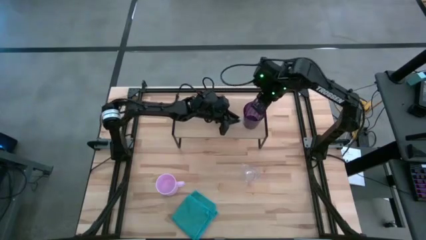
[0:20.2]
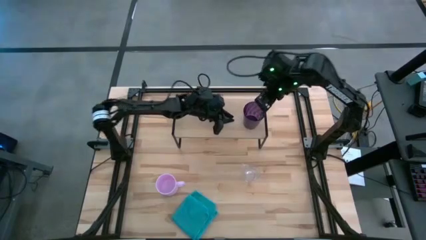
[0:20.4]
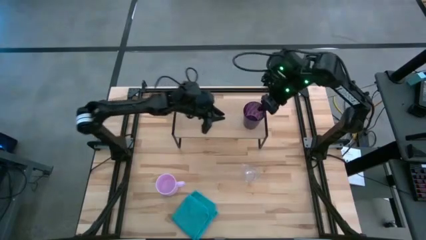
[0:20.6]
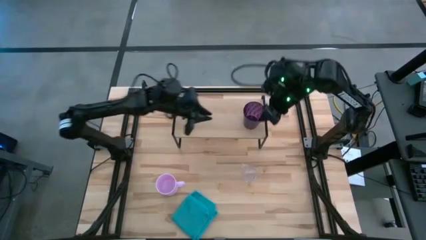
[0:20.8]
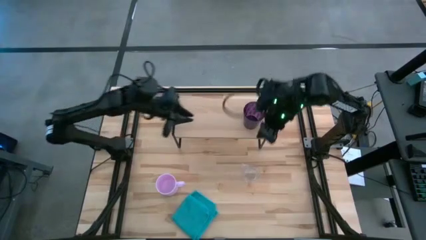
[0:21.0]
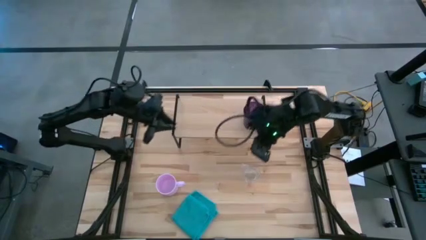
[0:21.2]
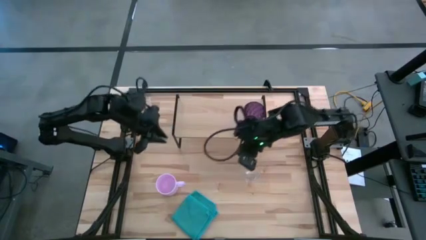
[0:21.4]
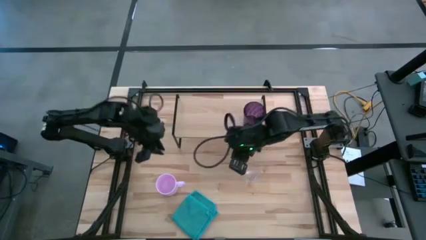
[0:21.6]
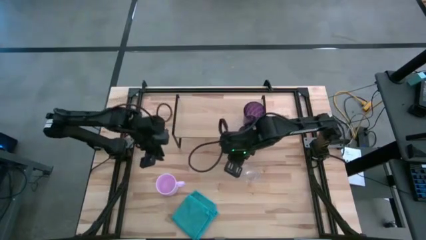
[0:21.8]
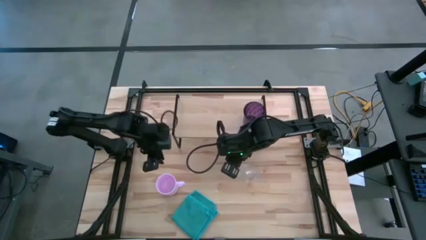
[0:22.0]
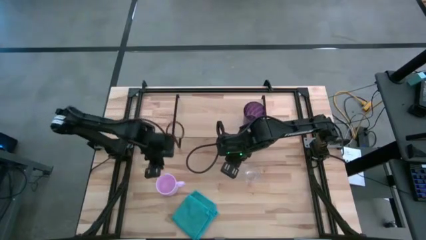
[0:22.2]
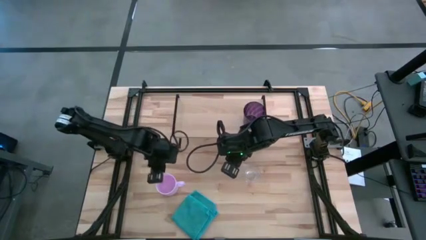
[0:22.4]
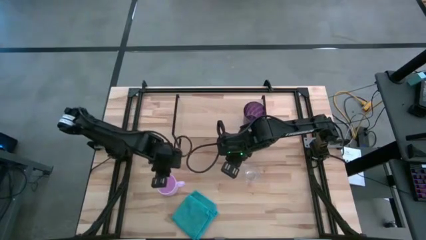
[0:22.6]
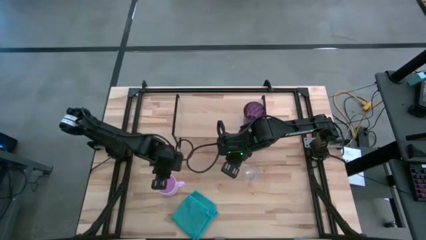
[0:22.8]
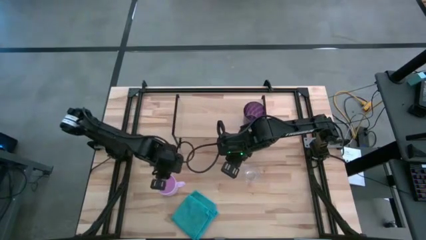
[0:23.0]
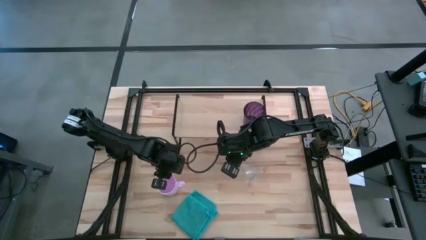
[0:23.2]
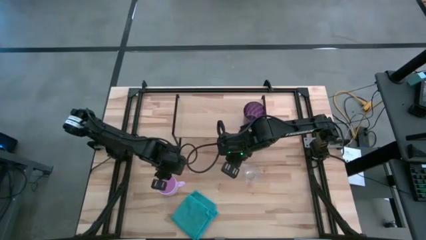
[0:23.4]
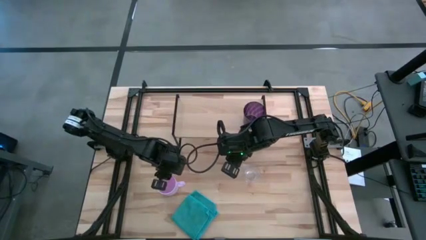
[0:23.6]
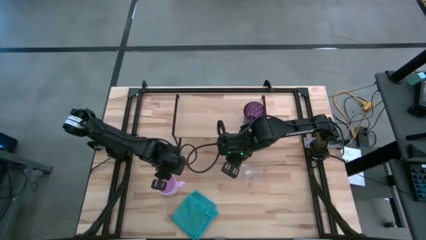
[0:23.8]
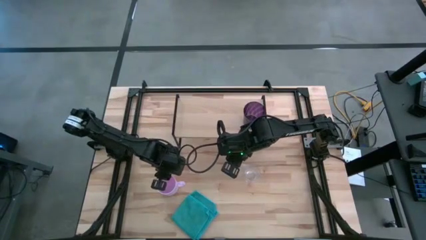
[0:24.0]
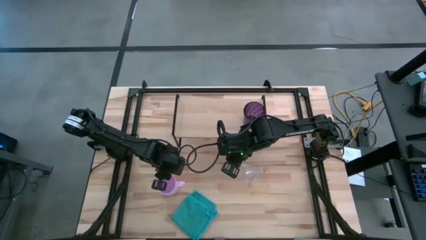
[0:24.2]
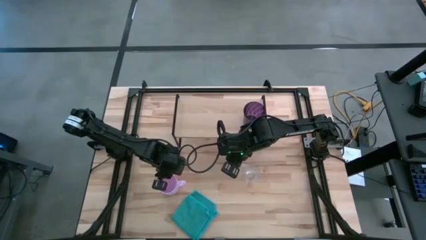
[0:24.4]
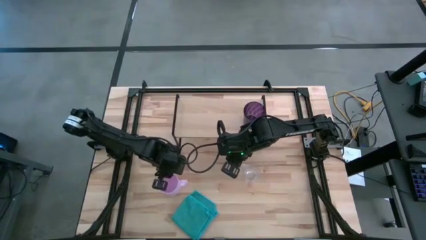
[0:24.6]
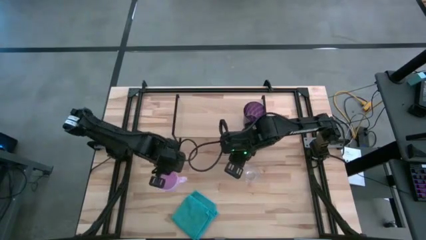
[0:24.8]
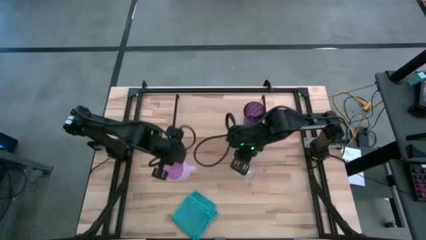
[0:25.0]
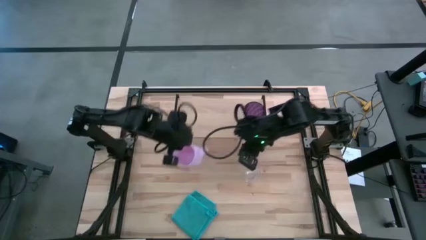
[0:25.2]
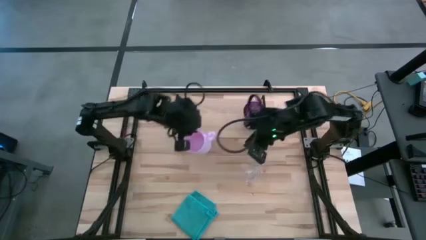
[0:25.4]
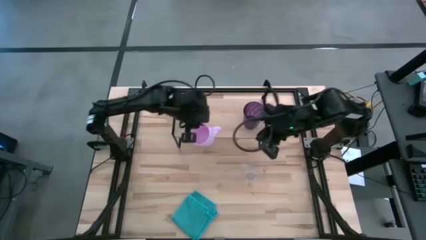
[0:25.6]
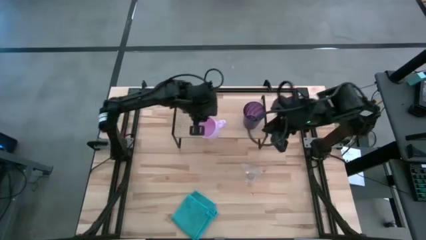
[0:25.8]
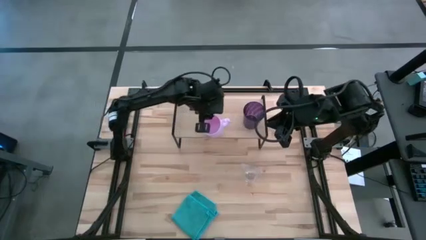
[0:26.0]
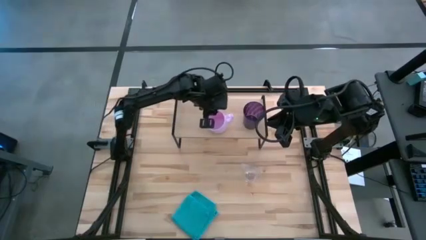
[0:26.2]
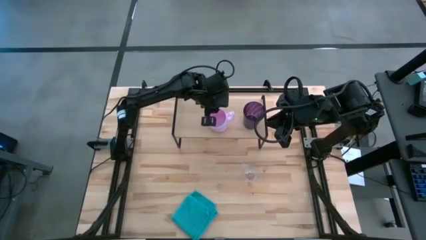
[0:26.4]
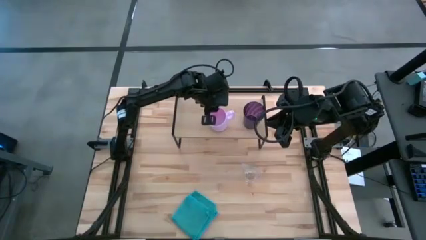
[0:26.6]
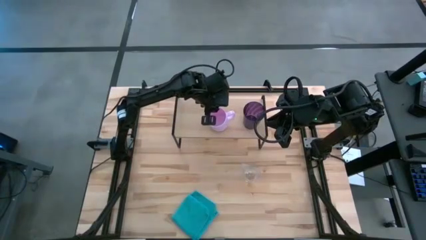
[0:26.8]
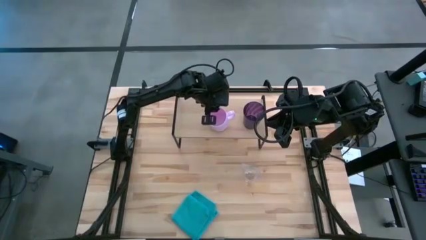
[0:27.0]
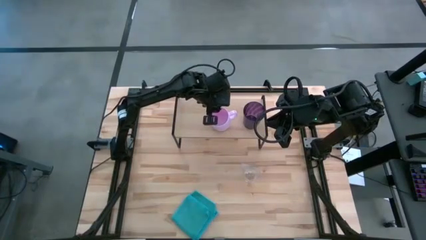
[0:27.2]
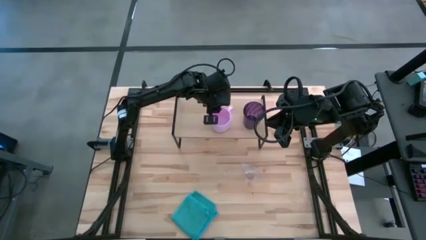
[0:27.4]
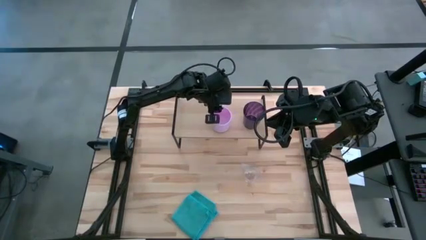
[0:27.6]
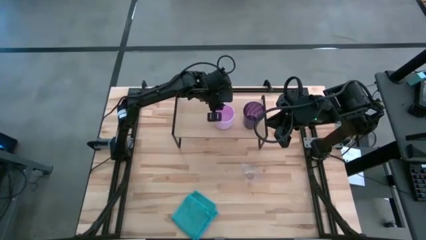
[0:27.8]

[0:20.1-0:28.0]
Task: Stack small to large cups/mugs on shelf
Put the pink mug on the shelf

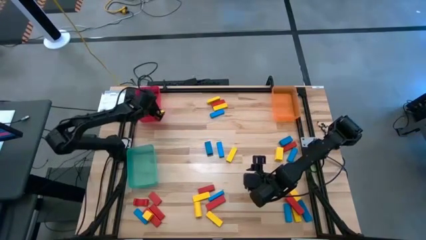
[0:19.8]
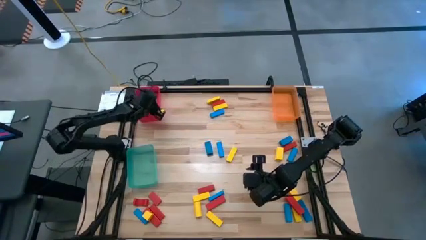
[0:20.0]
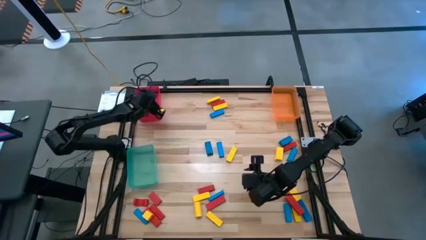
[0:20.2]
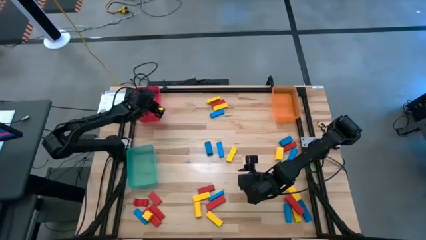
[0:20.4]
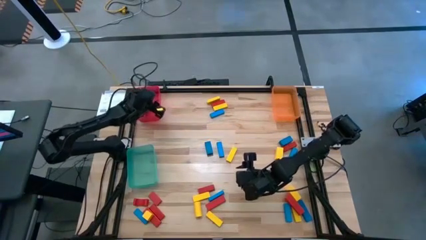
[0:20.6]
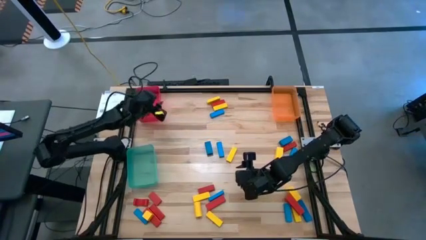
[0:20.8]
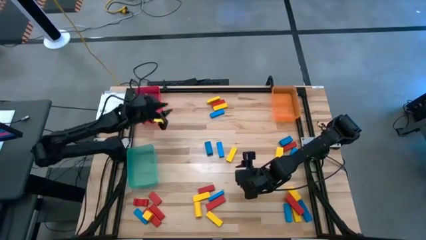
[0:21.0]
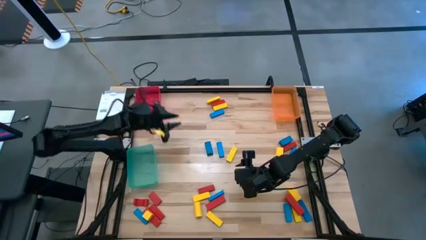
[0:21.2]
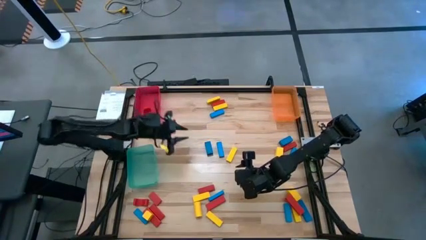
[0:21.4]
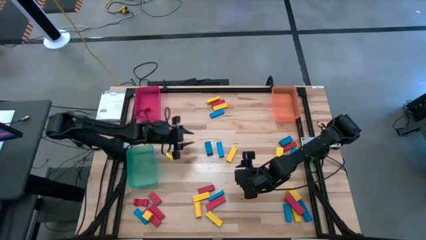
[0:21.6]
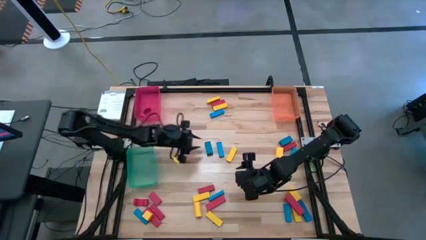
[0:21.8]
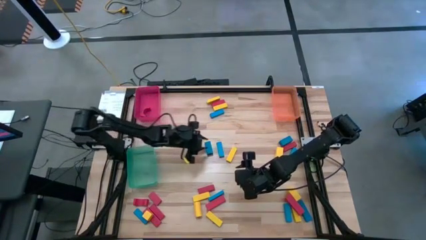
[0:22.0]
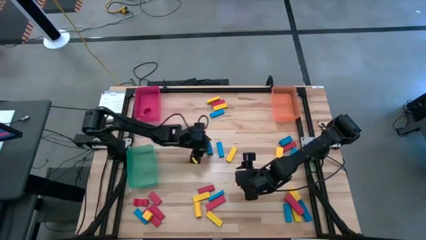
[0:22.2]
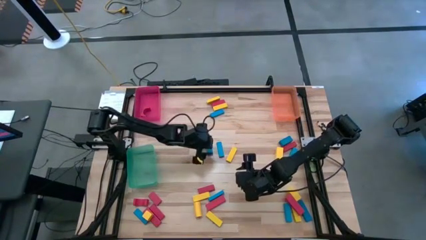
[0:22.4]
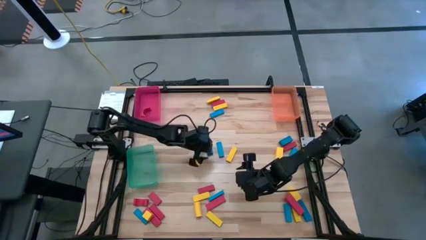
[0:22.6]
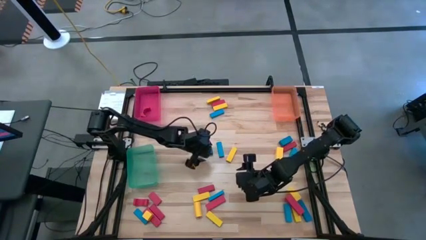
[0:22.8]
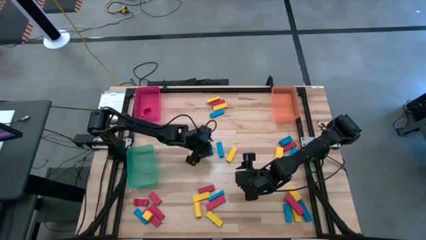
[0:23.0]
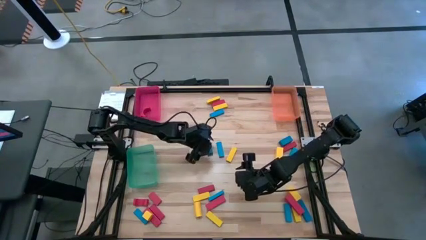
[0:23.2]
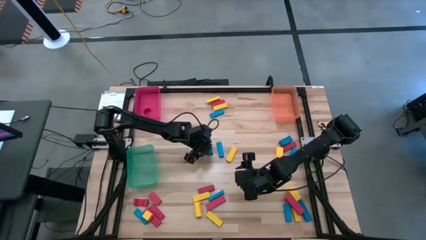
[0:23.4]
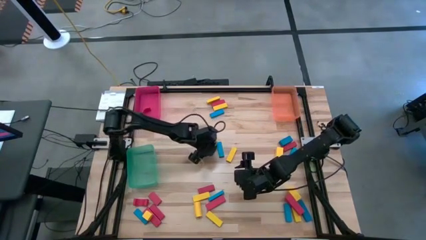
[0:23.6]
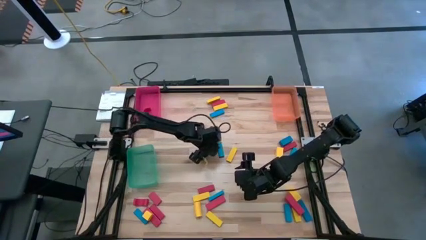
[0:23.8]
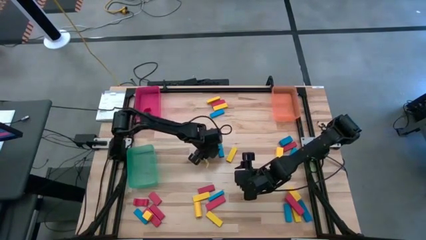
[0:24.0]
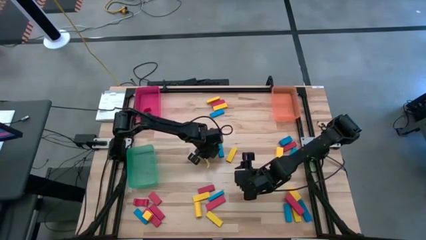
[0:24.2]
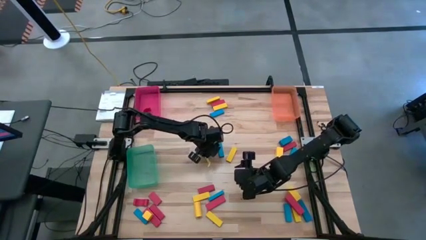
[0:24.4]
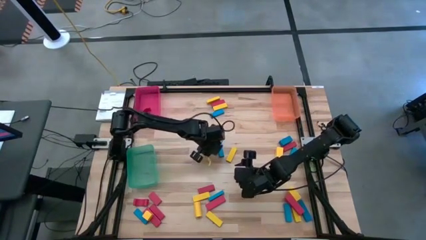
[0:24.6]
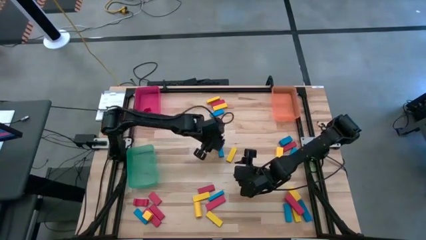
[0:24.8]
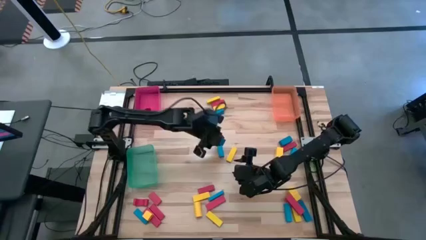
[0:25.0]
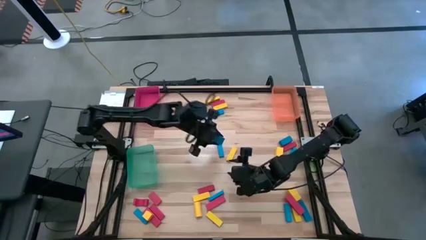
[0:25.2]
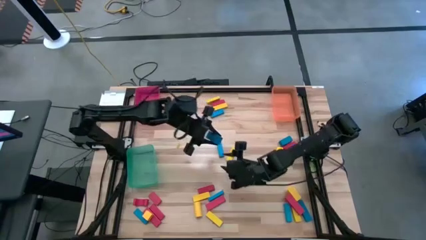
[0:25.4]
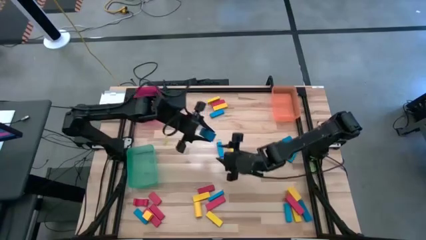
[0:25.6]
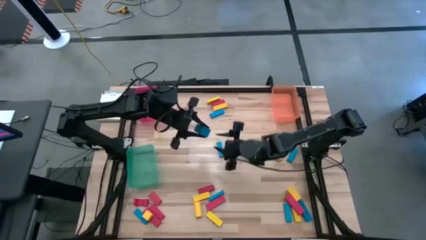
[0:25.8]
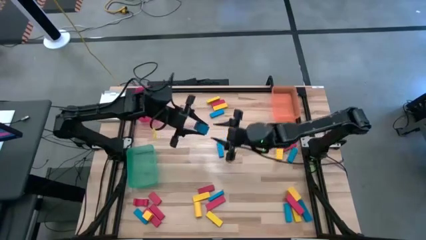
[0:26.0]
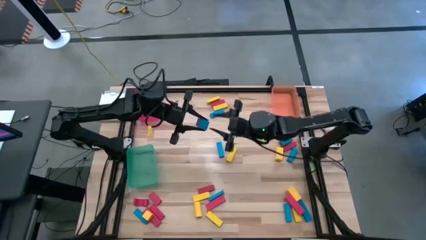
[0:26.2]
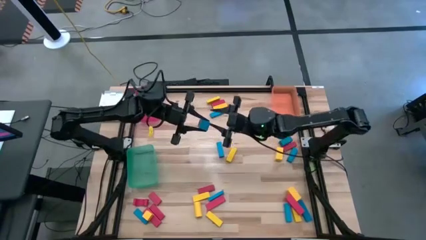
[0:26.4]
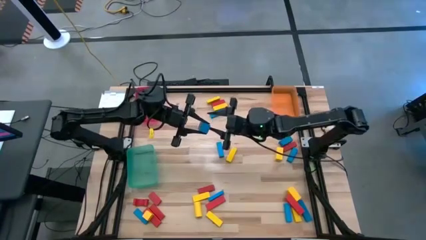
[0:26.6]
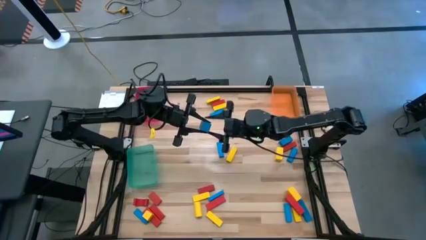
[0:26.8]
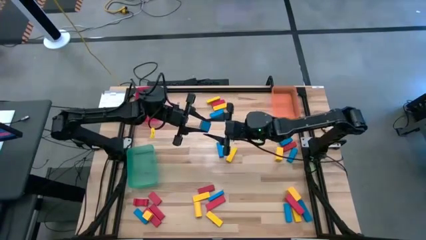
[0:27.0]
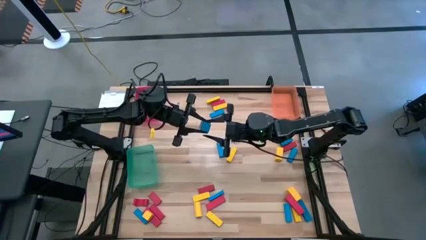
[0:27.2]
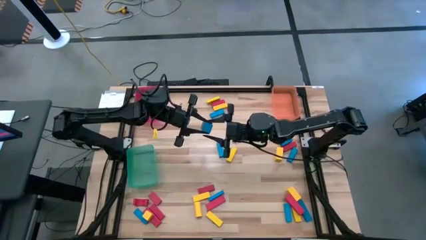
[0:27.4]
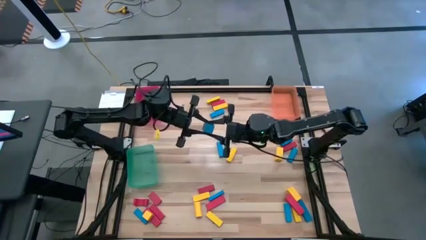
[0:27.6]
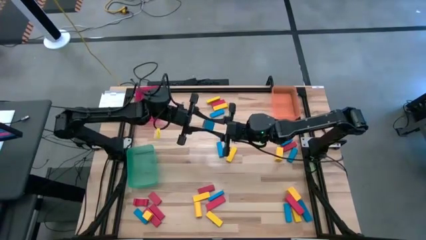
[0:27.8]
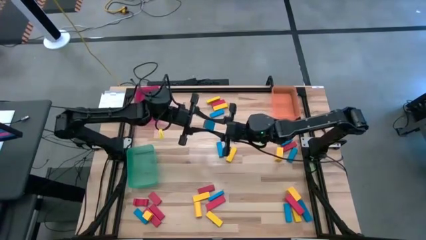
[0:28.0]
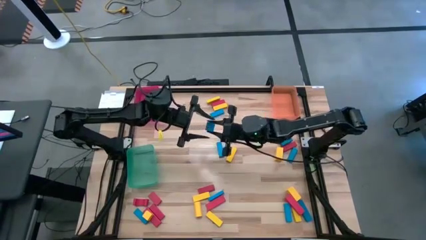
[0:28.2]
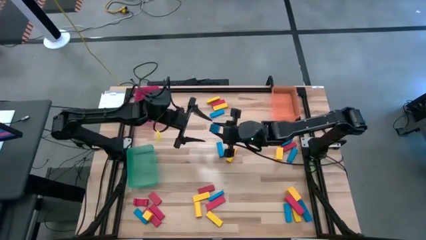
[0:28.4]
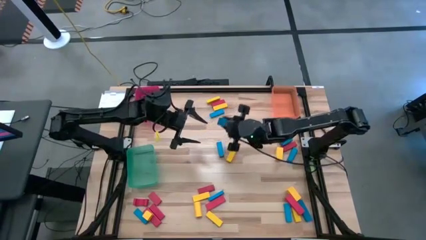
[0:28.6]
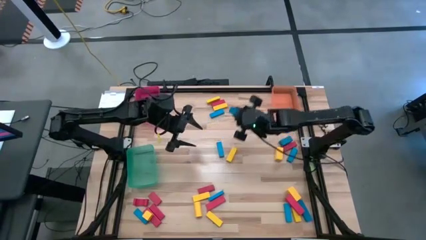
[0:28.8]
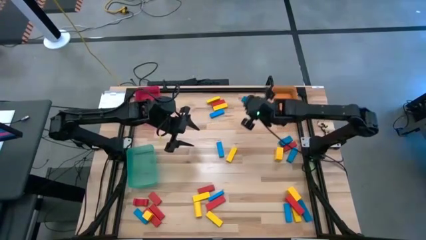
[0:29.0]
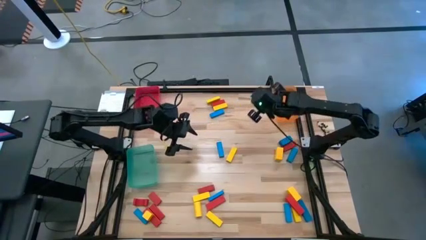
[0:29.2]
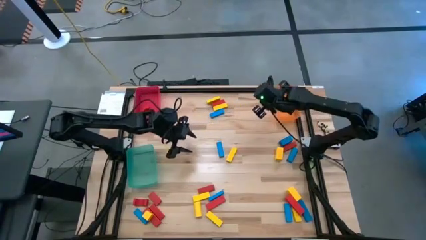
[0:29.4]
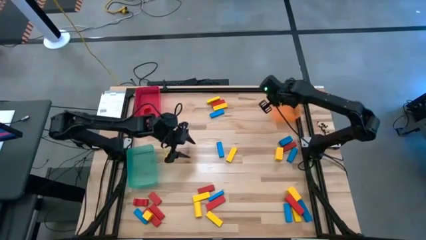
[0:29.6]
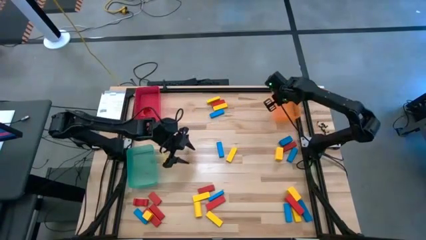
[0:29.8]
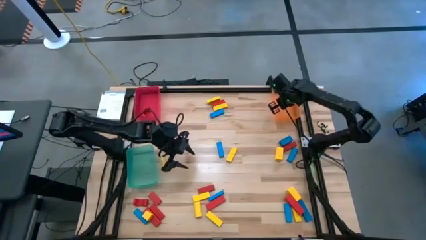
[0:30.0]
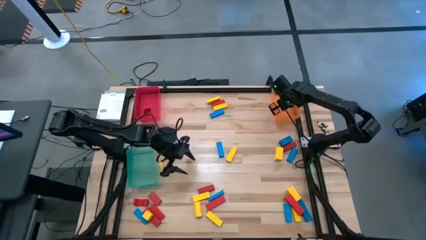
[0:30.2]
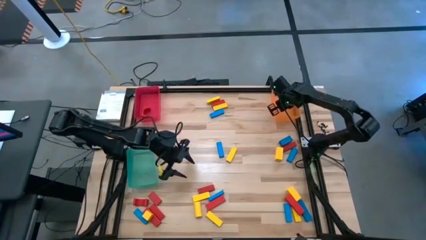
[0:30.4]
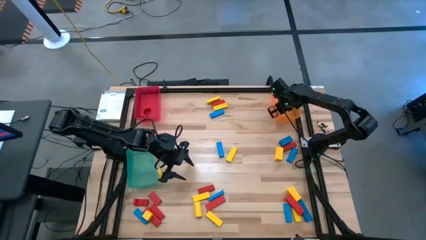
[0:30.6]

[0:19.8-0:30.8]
Task: Sort blocks
Put the blue block into the orange bin
